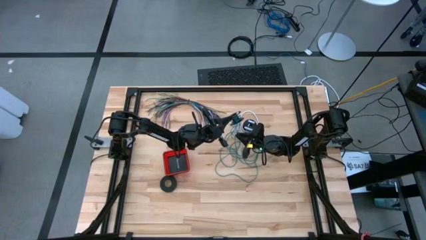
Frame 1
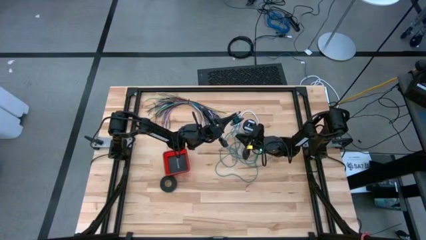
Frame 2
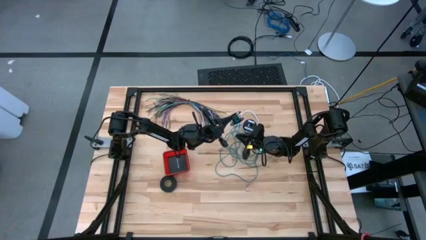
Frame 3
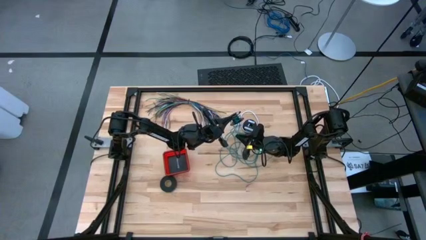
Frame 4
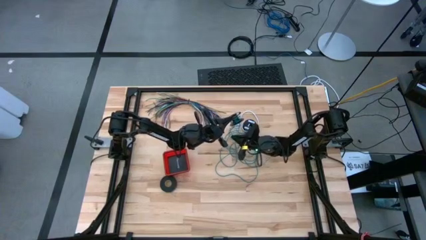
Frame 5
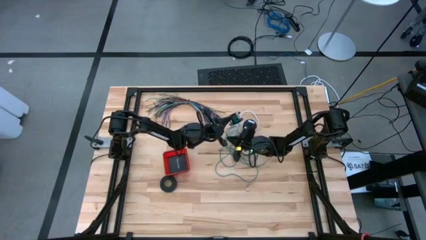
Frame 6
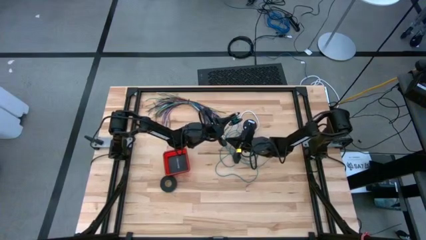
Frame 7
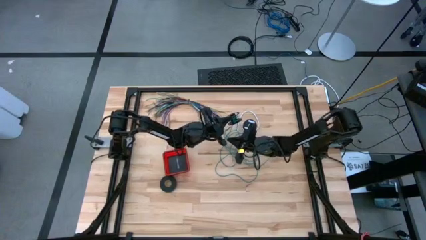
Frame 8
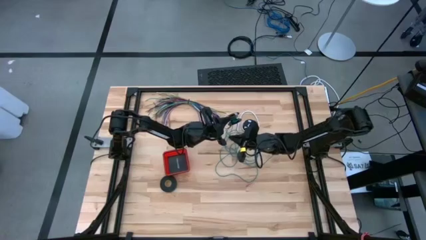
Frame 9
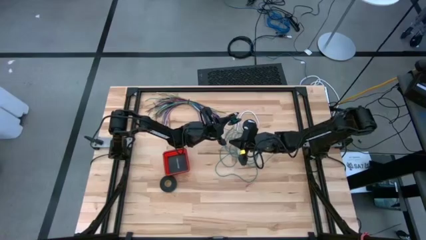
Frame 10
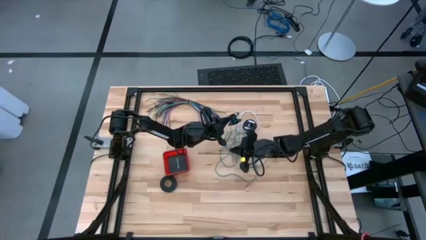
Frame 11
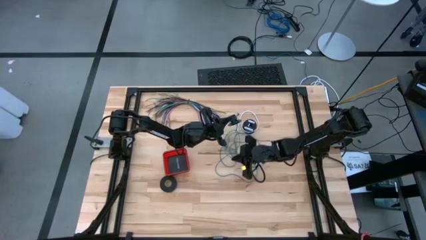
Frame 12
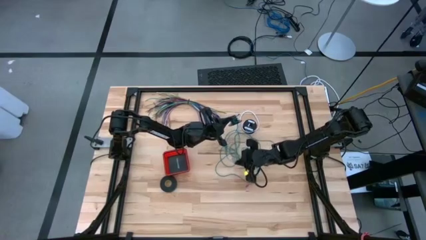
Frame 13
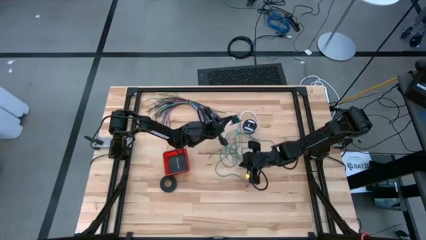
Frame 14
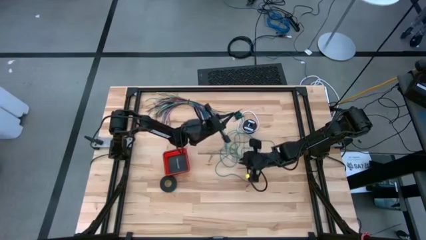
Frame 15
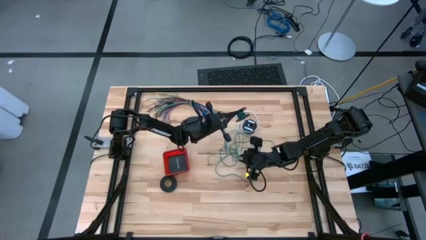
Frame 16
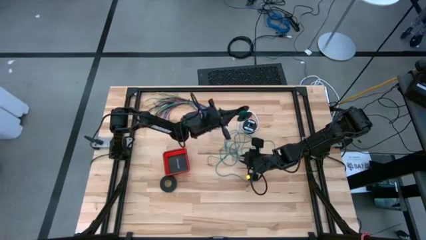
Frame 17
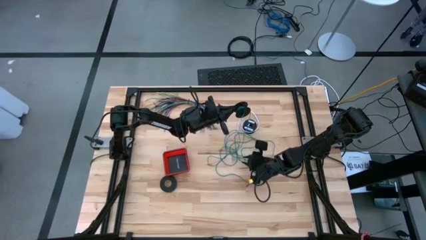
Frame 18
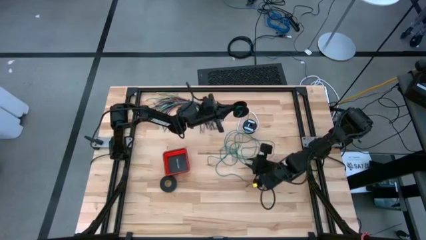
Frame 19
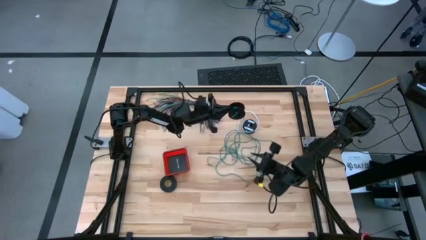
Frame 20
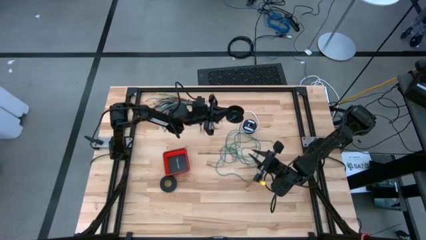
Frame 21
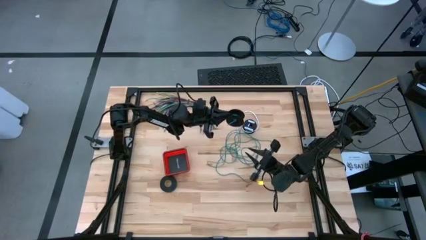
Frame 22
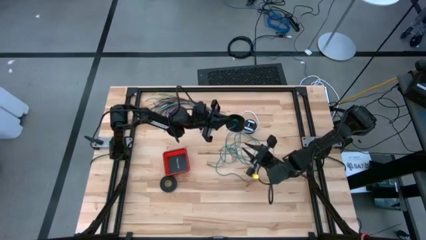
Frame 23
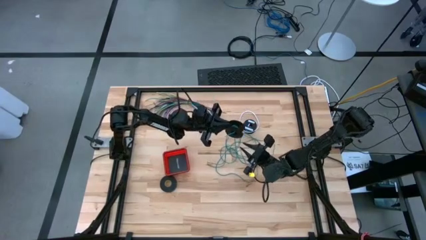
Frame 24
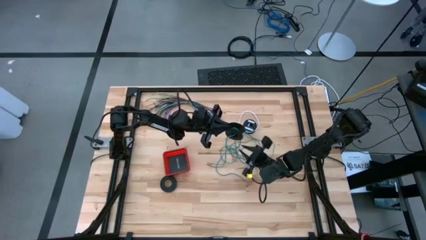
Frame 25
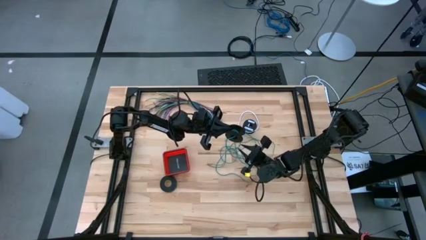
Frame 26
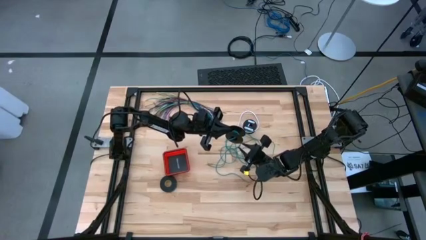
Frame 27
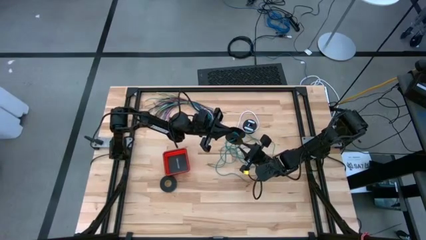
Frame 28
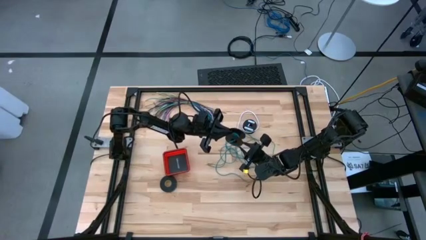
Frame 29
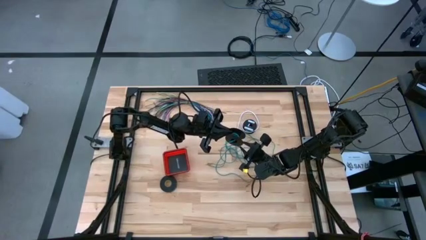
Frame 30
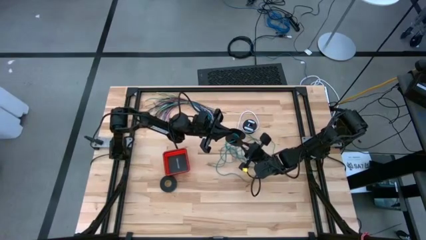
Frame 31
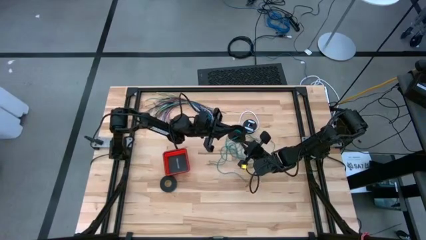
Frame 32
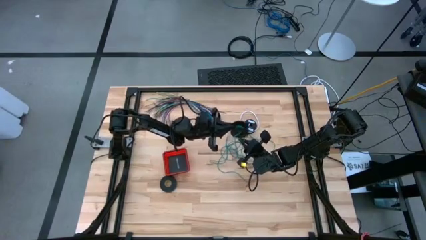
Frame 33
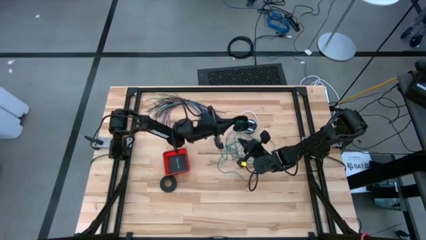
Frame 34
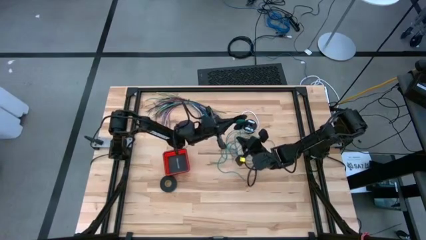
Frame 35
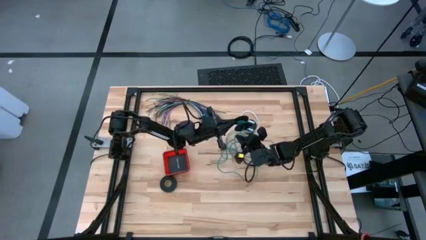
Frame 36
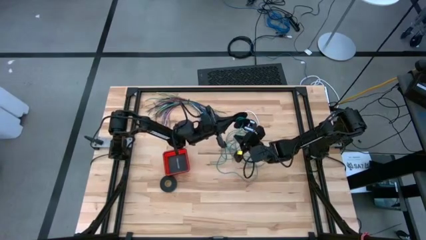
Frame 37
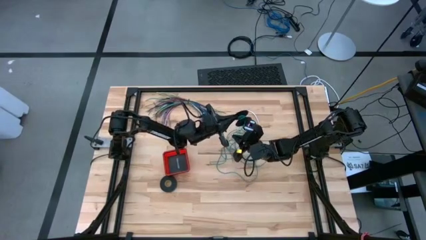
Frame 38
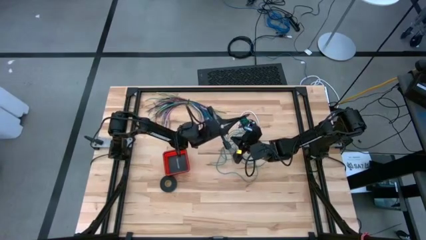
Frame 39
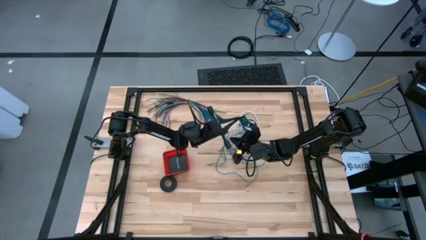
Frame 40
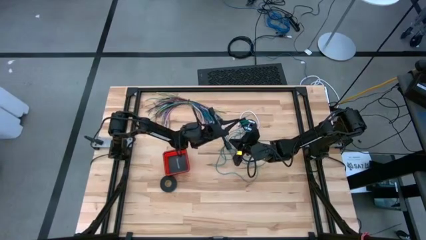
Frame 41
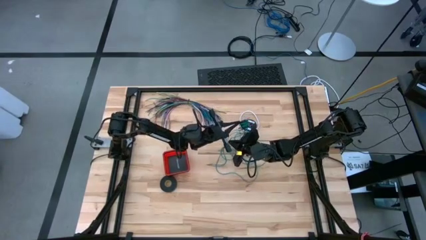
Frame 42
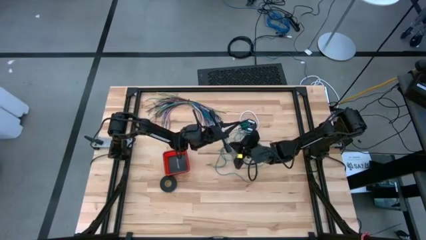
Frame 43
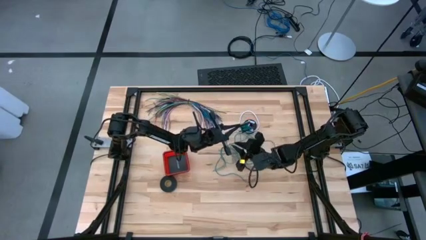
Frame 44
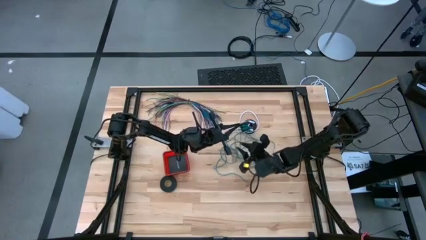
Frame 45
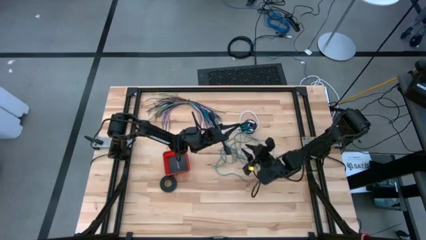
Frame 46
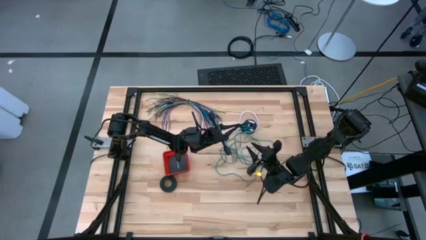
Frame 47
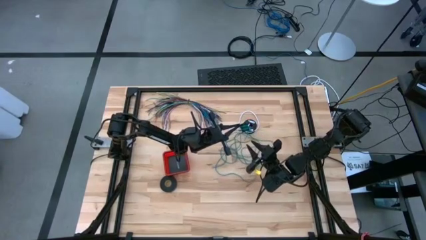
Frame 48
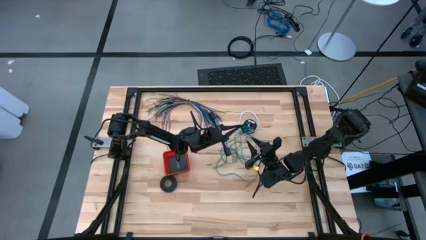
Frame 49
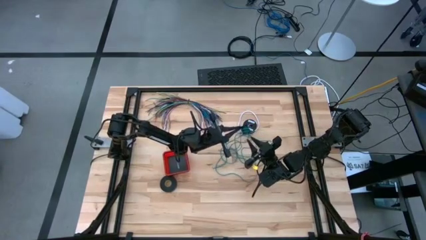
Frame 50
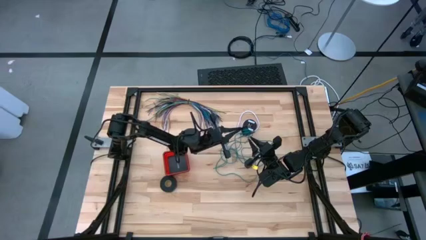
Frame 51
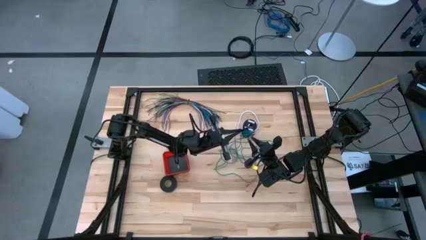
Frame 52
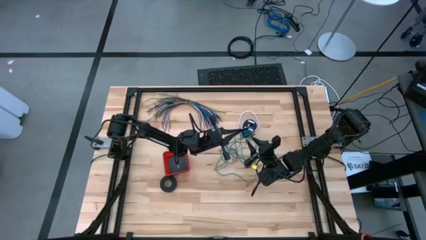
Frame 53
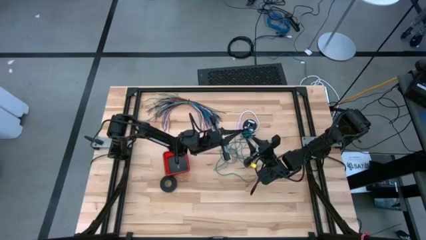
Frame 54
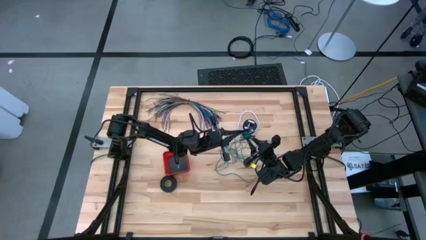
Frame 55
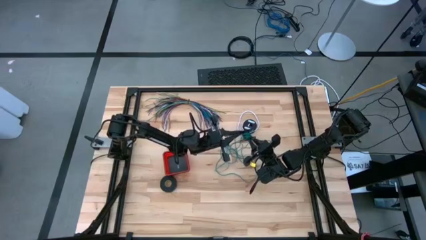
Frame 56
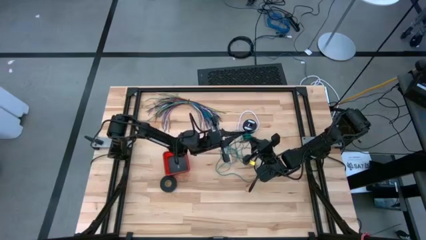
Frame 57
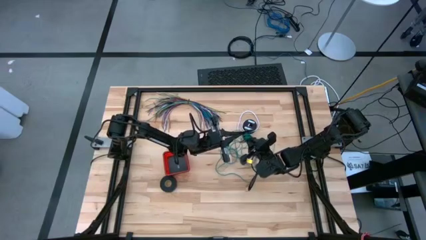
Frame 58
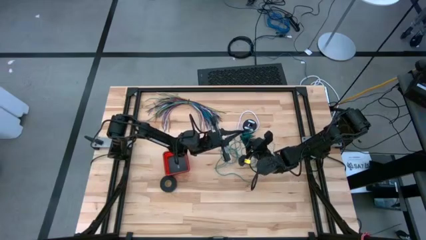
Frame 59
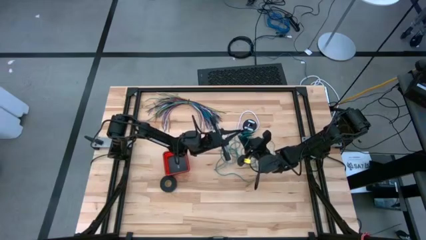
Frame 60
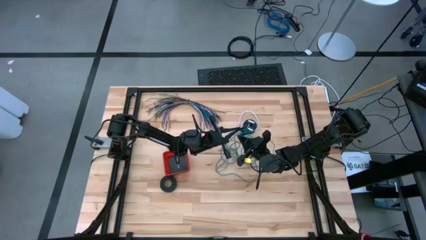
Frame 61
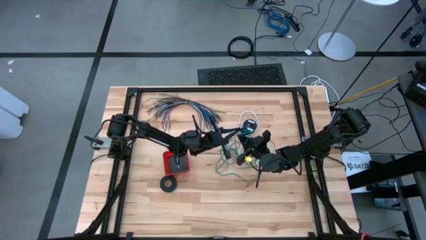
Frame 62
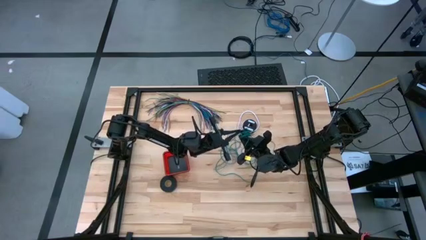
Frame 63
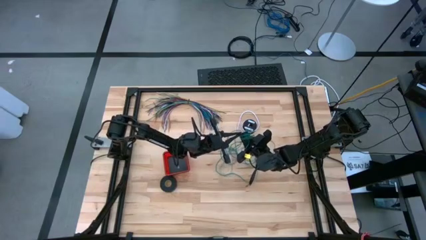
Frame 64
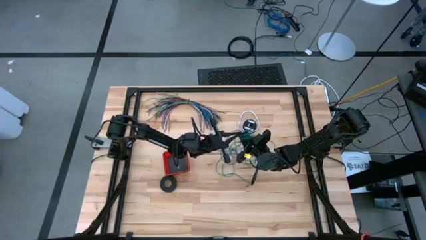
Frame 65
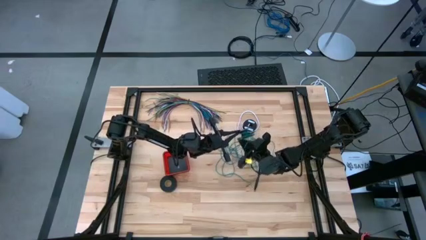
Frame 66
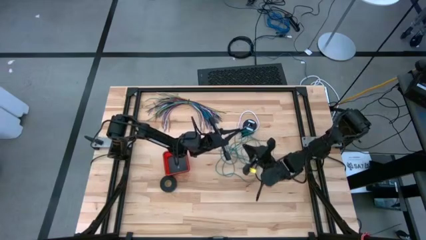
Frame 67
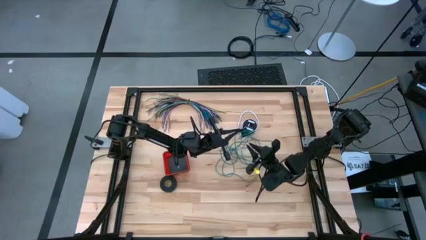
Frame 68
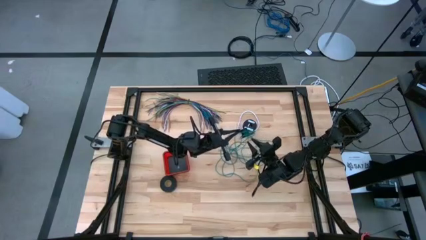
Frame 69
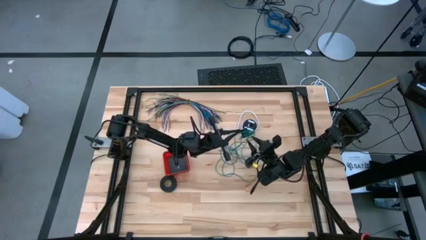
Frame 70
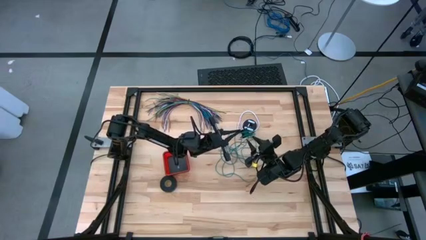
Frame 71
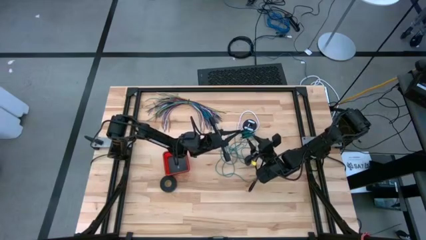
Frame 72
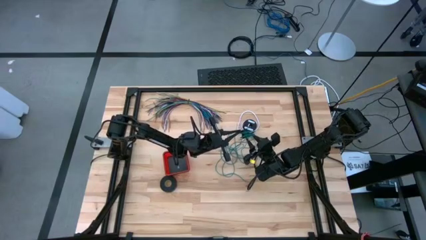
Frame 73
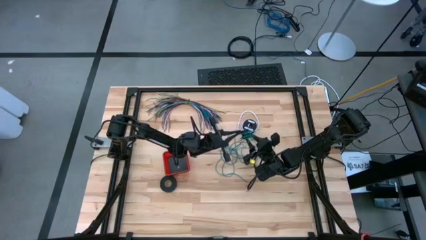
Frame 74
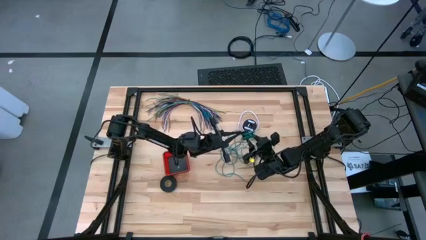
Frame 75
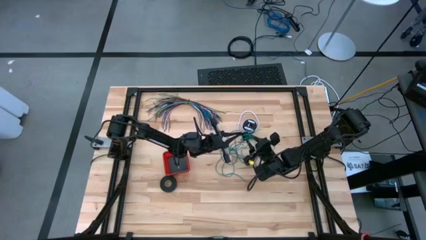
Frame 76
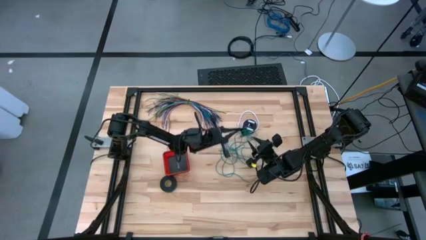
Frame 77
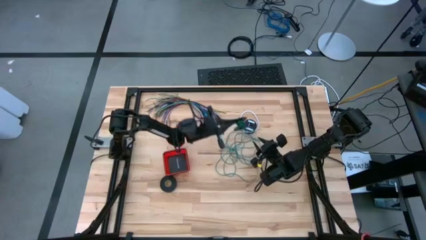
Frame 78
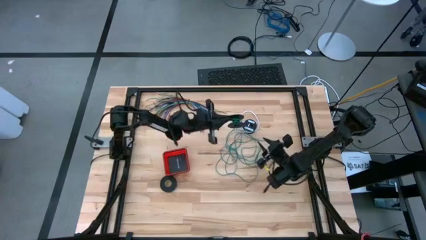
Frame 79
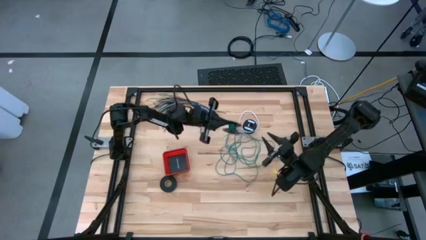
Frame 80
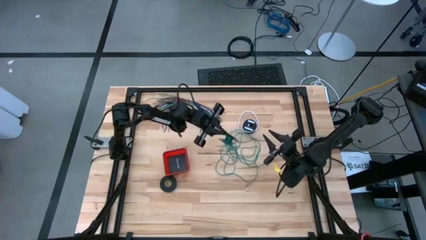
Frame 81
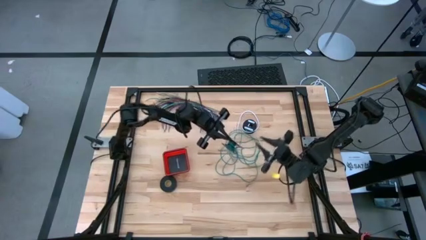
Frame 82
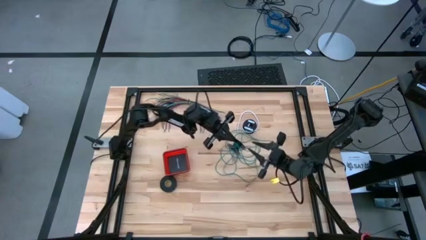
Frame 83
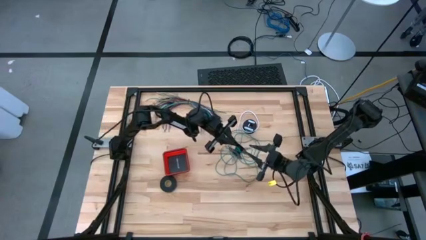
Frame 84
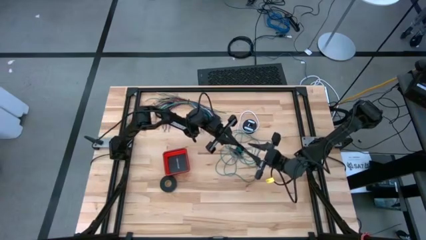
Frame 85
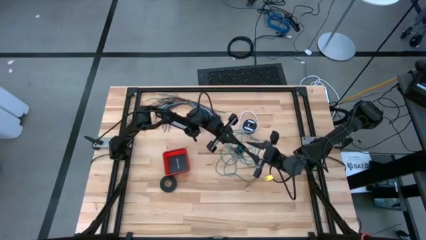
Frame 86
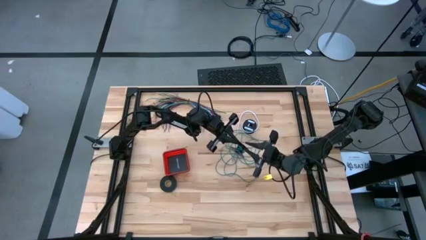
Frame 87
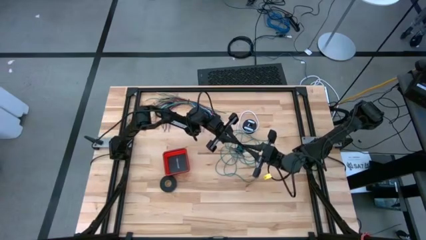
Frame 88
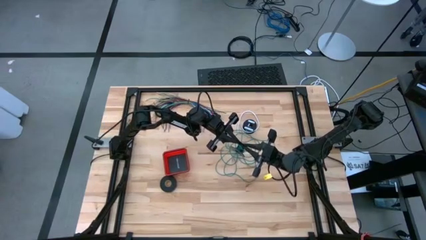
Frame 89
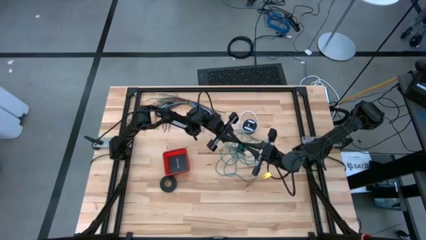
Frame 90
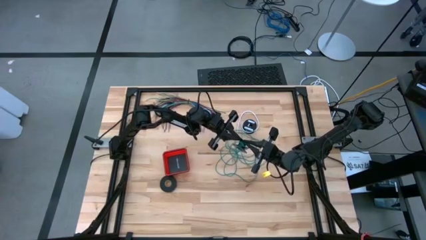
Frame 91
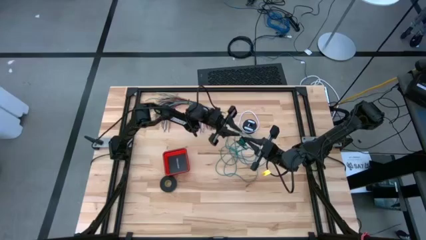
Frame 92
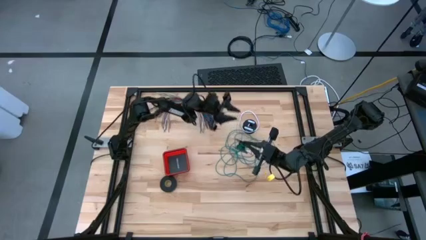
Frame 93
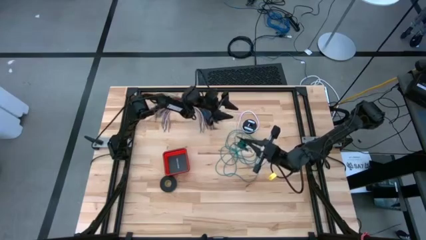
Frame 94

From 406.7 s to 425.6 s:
Task: Coil cords
Coil the green wire onto the spool
